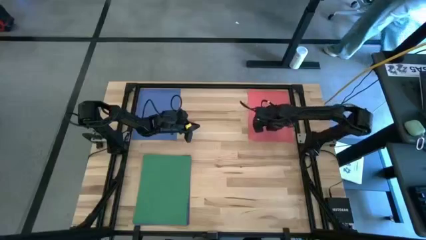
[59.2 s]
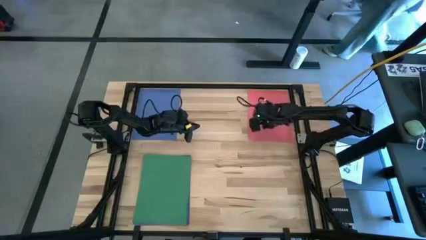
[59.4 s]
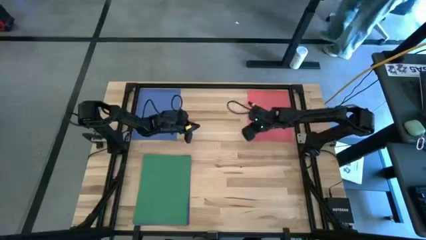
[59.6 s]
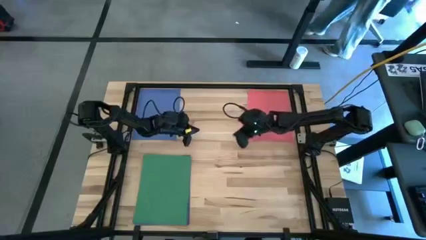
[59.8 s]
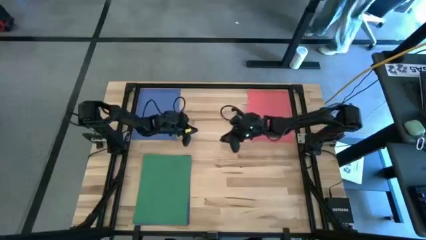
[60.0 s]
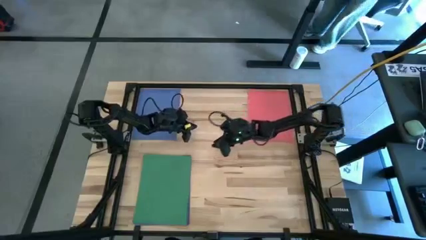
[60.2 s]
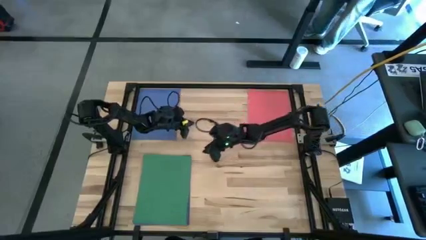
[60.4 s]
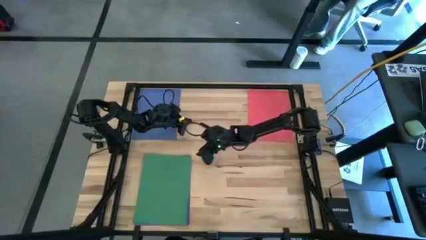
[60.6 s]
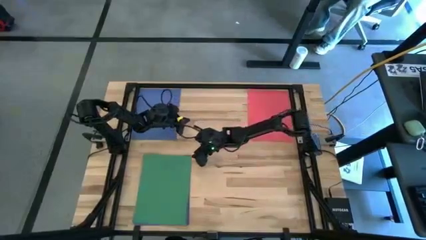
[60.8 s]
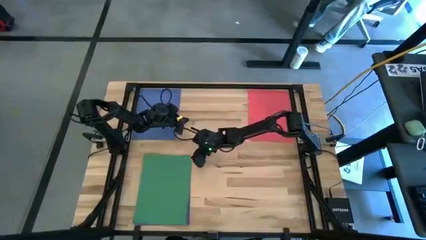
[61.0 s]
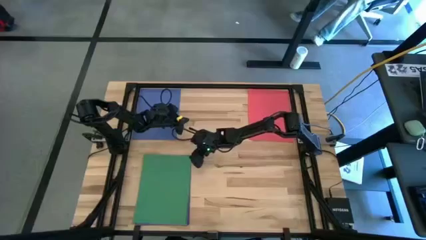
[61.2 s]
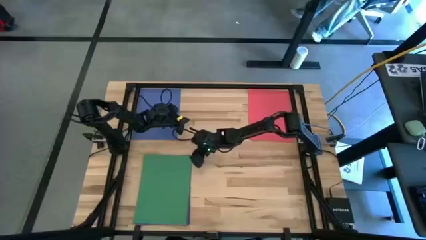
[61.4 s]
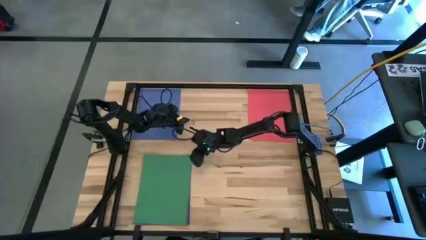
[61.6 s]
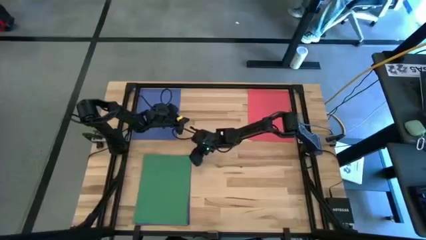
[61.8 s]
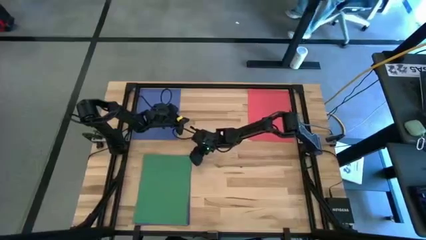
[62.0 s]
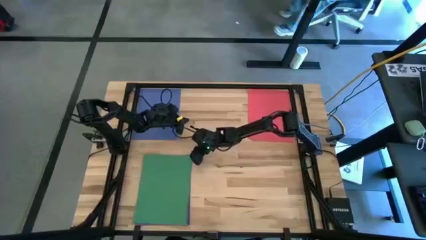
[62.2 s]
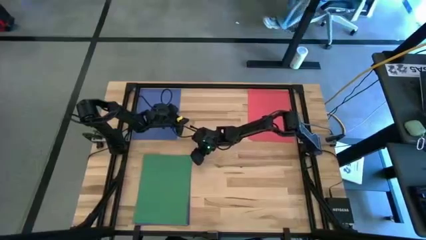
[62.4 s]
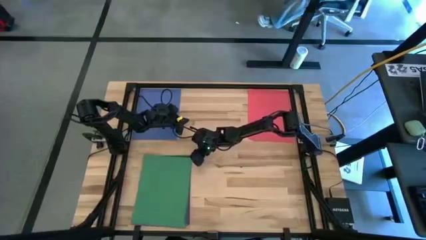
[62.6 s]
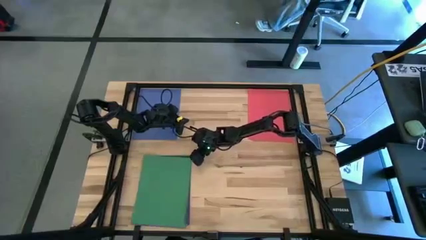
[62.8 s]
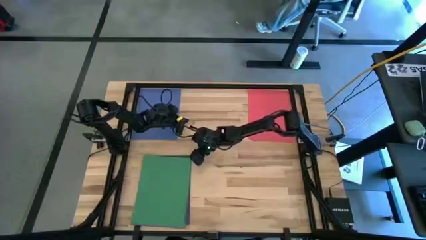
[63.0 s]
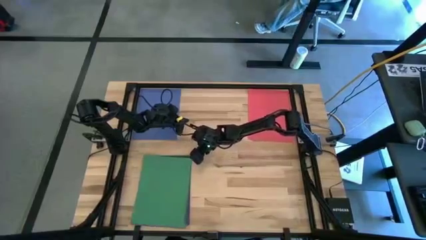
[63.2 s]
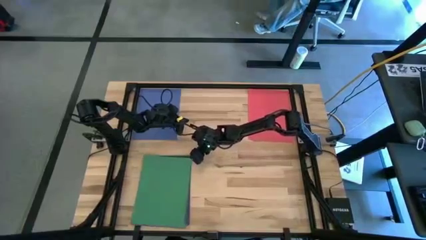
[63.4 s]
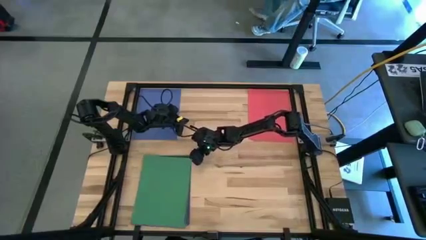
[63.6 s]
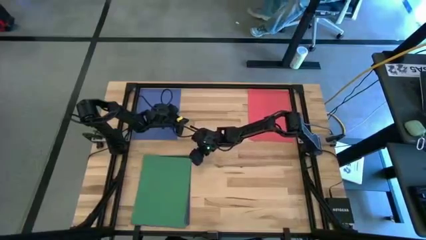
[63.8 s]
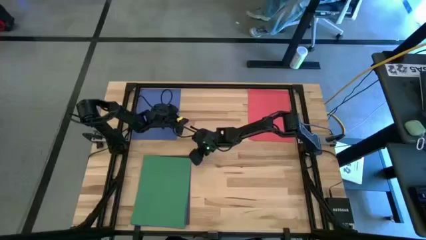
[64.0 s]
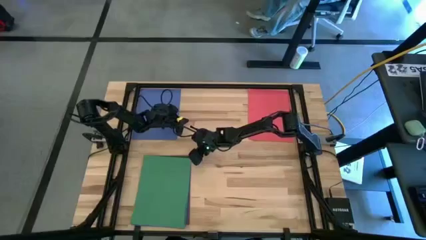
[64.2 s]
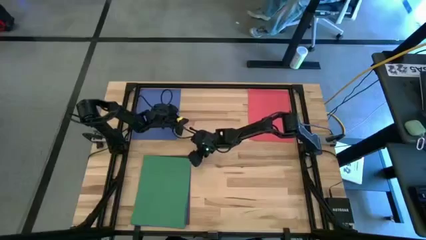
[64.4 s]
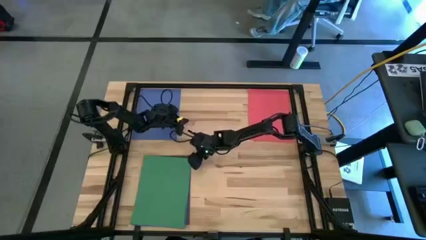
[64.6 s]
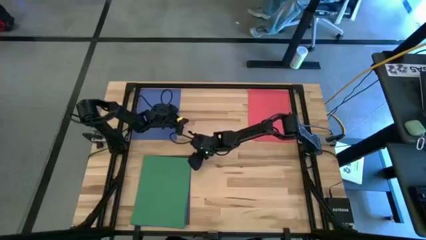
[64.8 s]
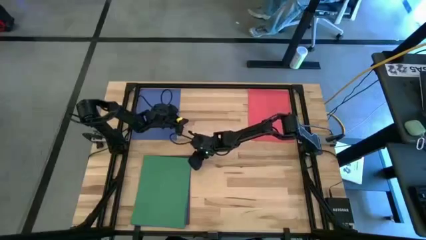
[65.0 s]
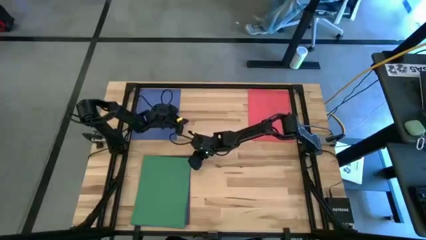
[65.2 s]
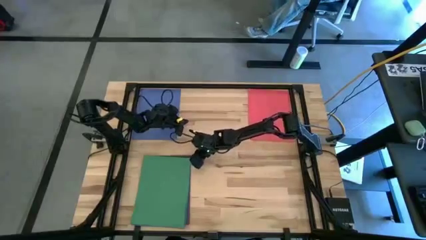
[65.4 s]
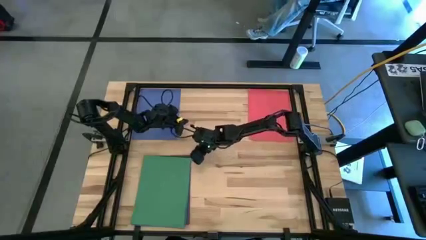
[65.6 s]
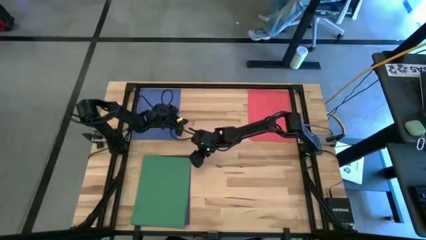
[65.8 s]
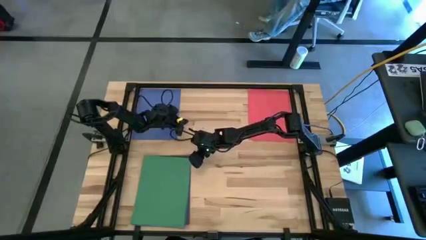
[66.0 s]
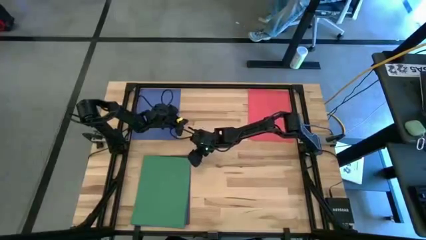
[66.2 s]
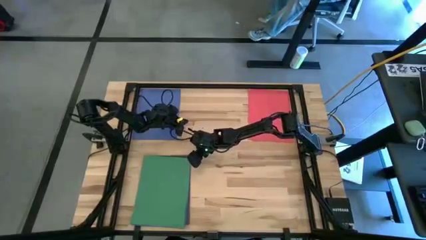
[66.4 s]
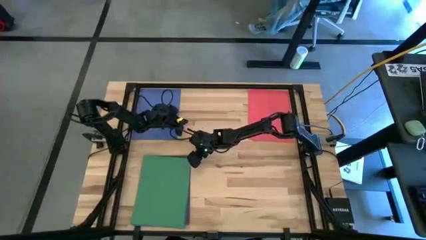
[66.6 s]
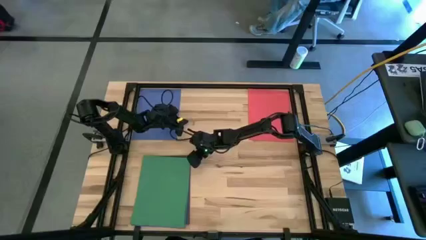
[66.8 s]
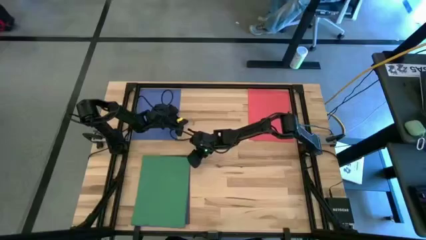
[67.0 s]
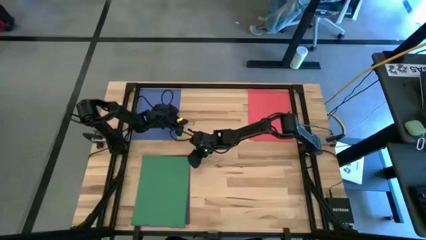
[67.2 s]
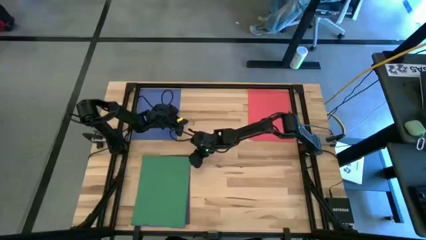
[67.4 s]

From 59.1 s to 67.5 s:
Task: Organize paper
Move the green paper to the top middle of the table

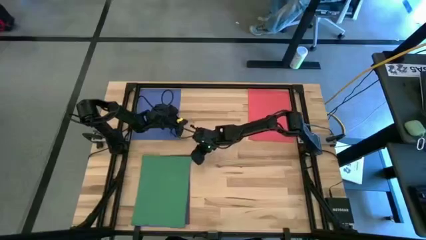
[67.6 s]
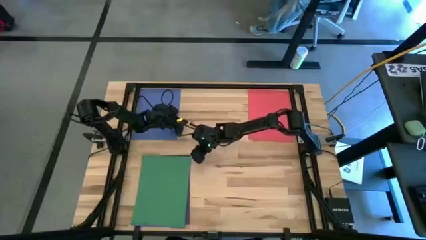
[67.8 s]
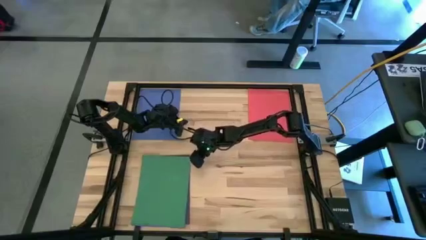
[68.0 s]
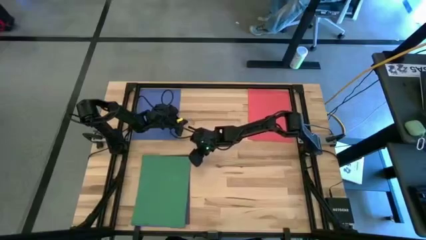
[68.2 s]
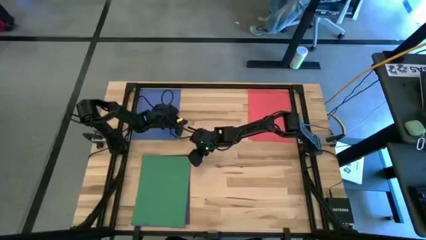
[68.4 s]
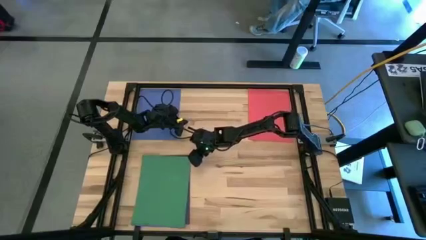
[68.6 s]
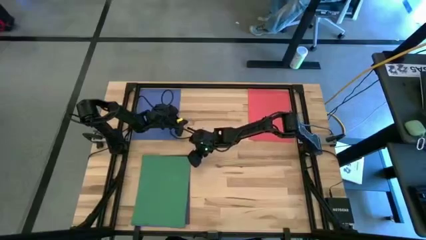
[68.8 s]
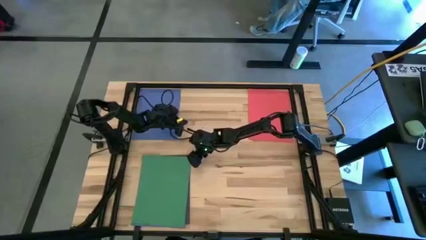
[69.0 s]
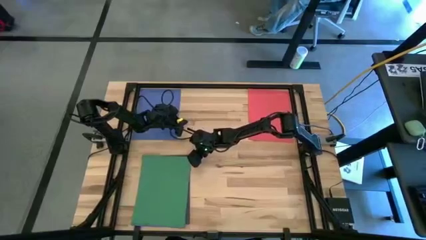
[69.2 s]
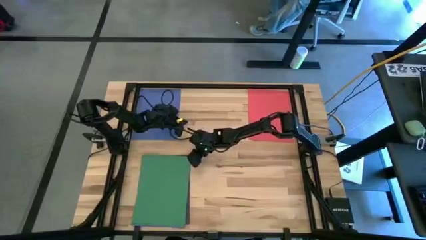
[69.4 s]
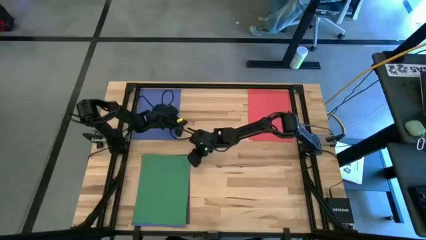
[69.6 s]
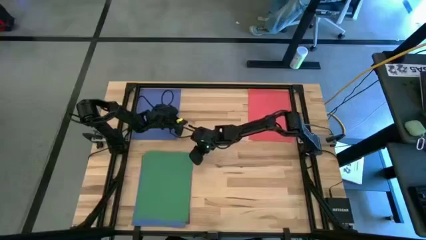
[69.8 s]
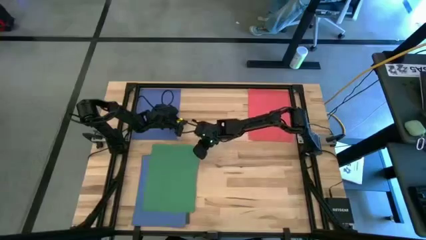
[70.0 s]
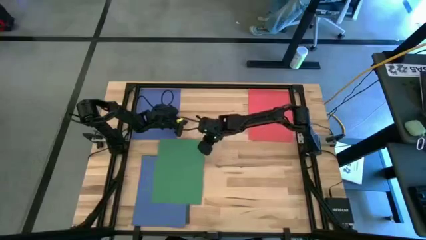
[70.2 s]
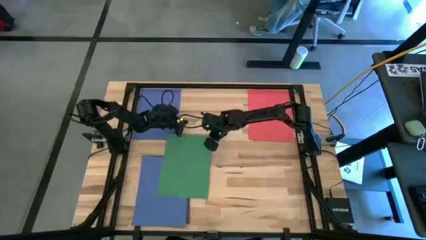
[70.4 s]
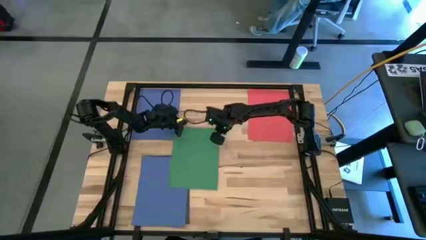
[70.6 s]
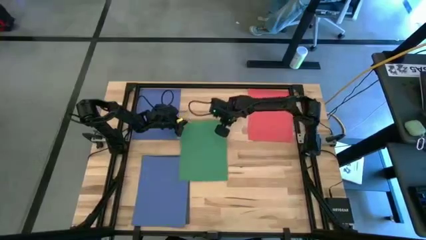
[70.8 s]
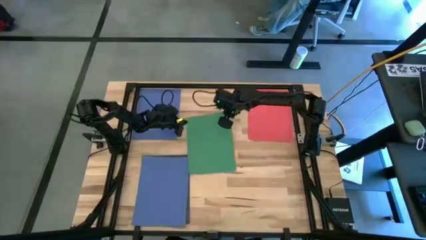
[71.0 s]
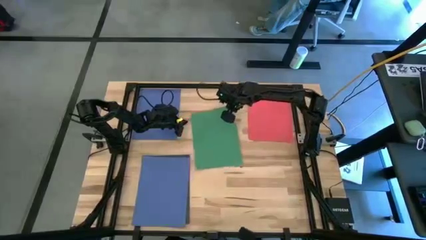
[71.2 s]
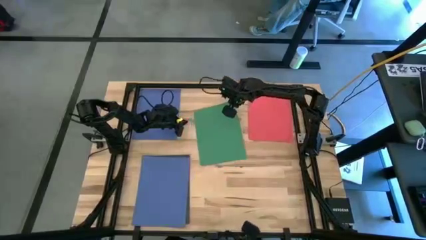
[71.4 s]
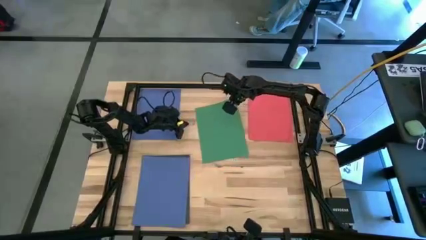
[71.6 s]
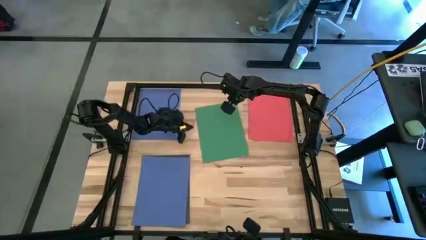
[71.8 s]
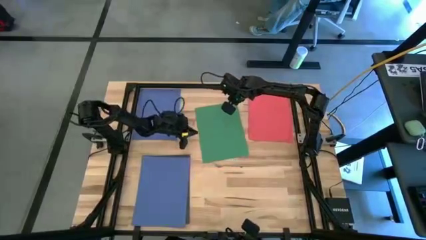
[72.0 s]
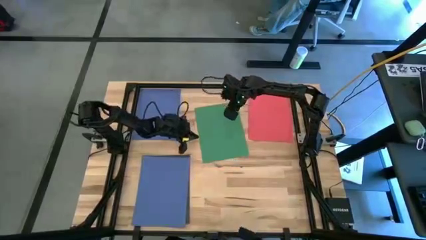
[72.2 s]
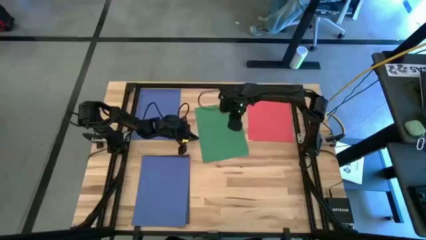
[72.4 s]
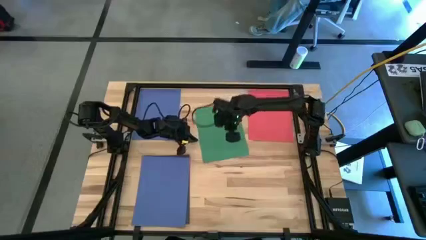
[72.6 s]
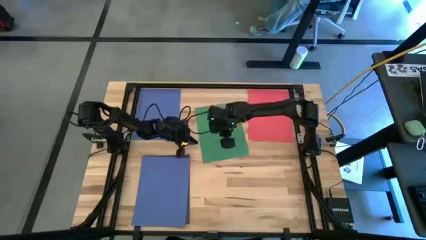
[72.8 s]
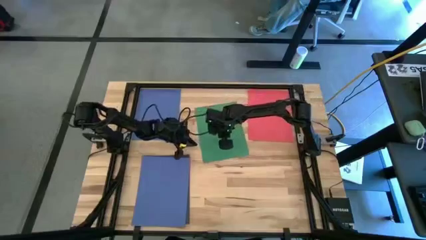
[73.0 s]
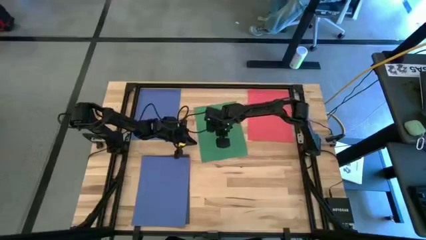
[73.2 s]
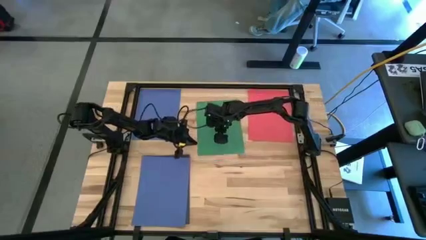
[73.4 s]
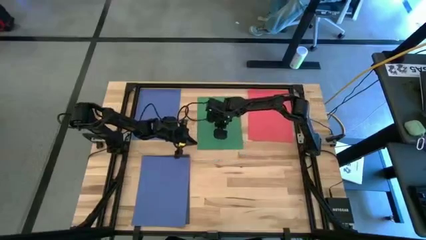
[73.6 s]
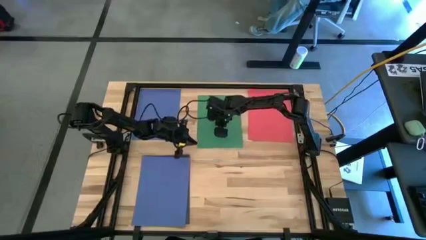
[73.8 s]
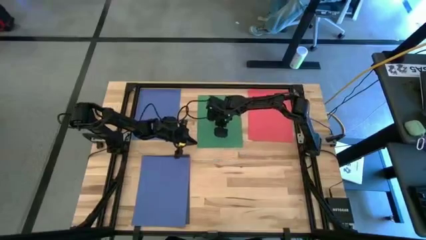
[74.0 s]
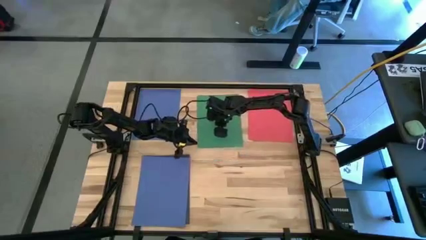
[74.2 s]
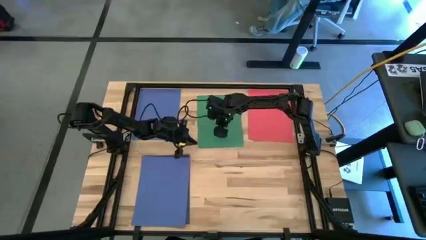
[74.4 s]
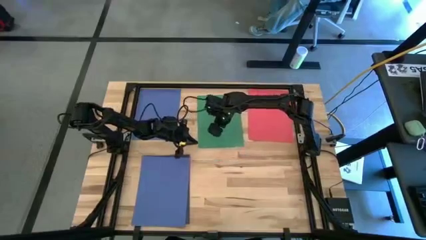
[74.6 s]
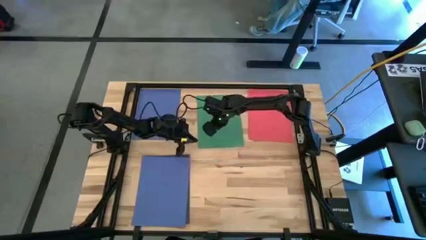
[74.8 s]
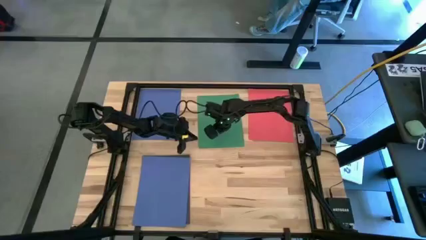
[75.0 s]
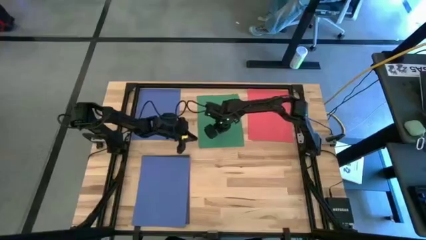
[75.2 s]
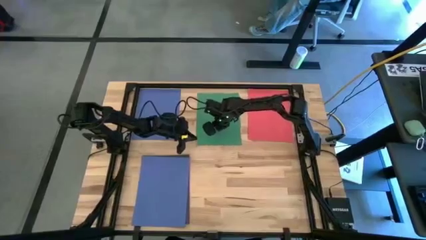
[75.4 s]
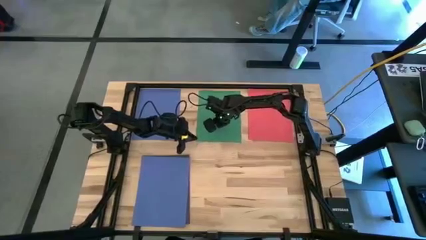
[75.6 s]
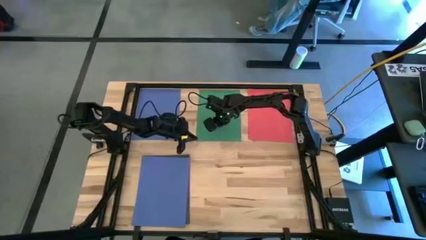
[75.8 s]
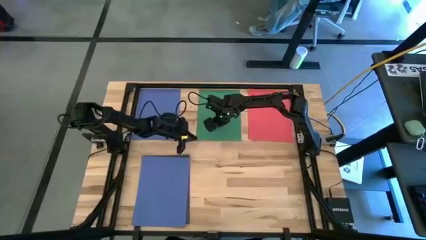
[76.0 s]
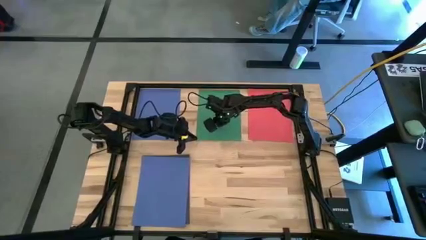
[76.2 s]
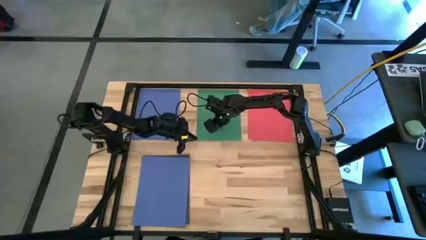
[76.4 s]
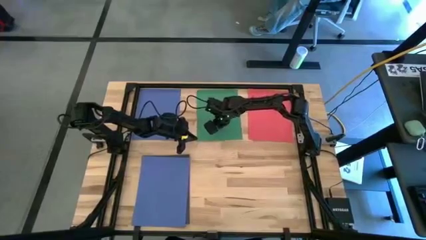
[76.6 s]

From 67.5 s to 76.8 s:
Move the green paper to the top middle of the table
